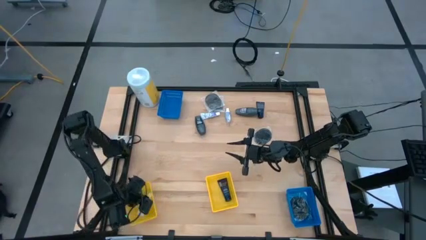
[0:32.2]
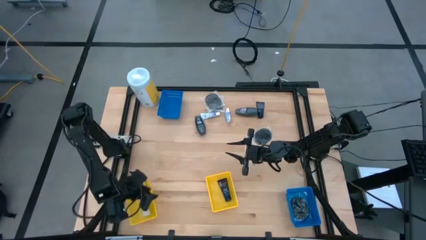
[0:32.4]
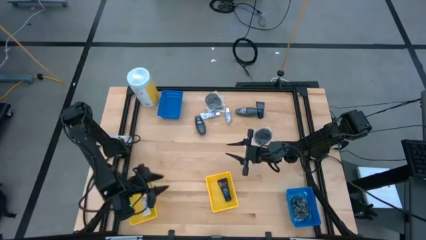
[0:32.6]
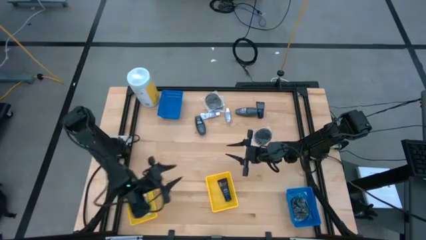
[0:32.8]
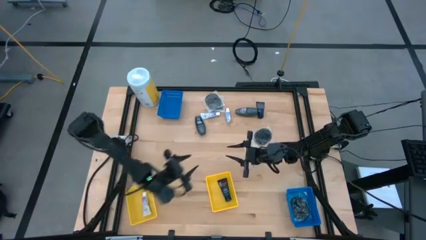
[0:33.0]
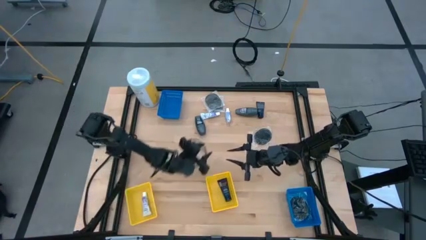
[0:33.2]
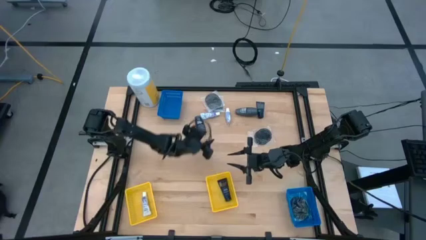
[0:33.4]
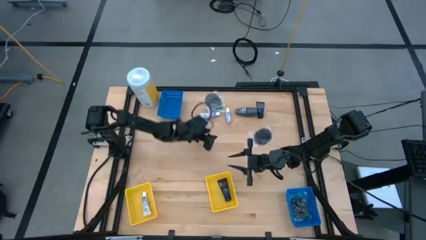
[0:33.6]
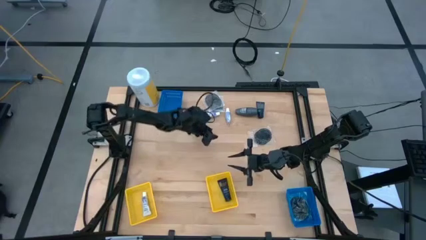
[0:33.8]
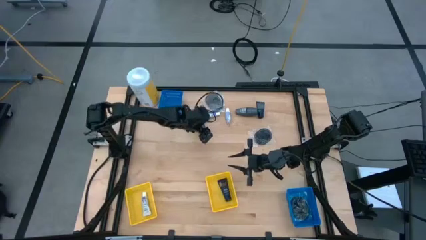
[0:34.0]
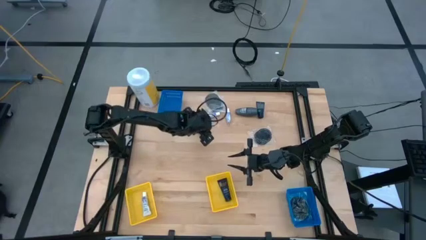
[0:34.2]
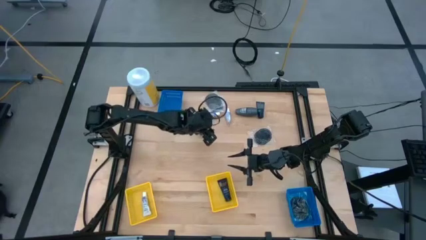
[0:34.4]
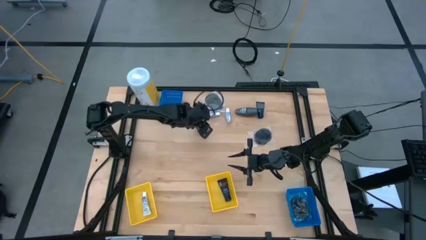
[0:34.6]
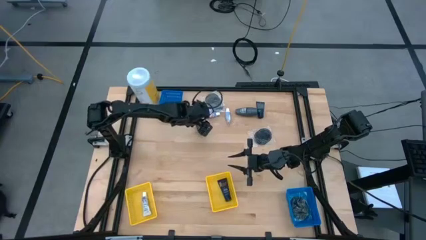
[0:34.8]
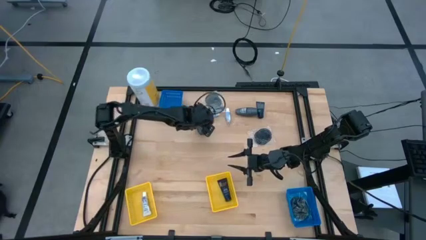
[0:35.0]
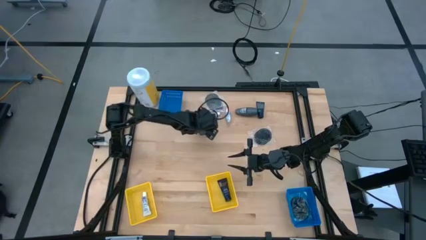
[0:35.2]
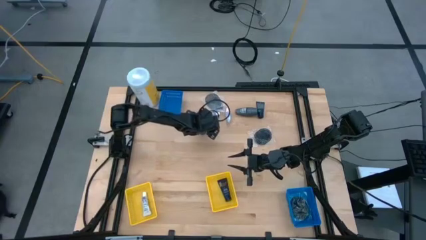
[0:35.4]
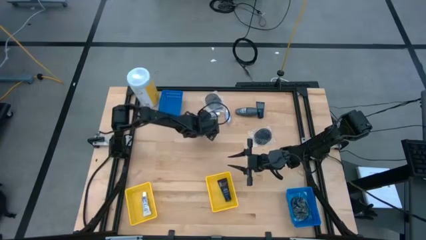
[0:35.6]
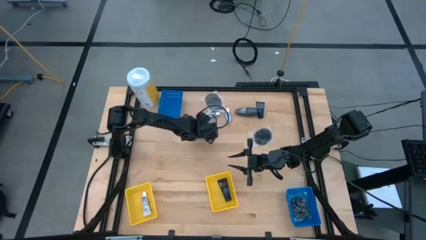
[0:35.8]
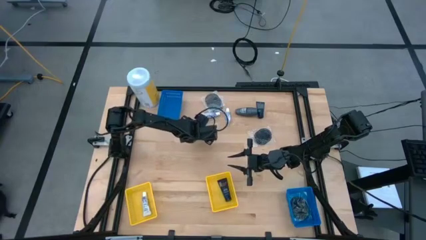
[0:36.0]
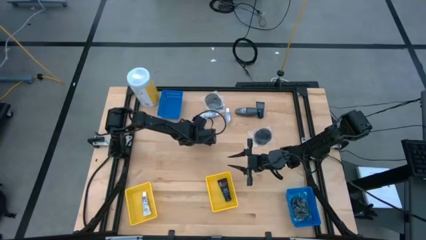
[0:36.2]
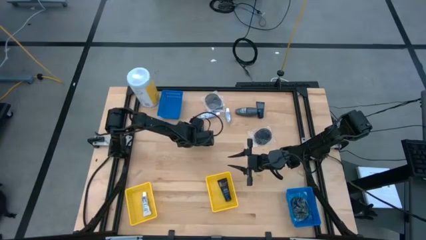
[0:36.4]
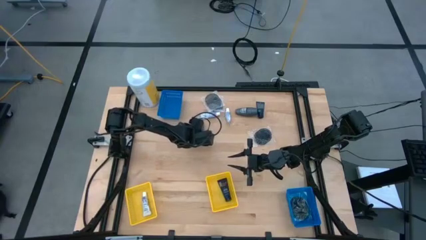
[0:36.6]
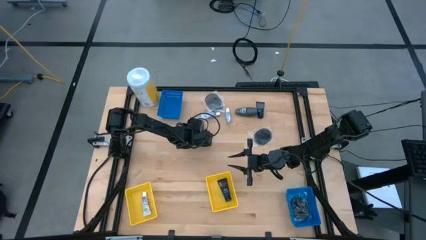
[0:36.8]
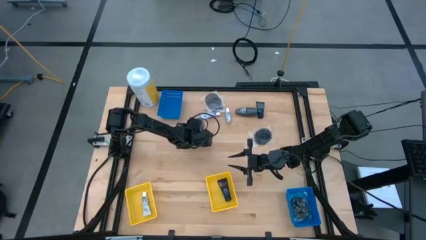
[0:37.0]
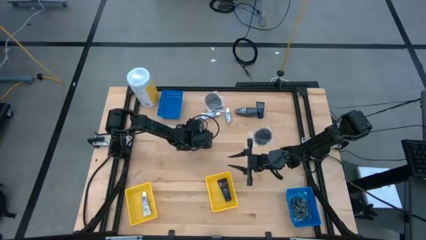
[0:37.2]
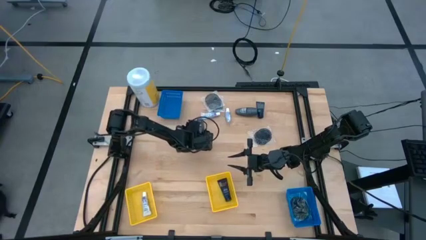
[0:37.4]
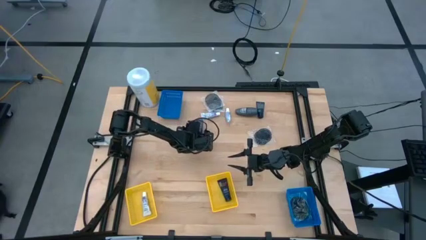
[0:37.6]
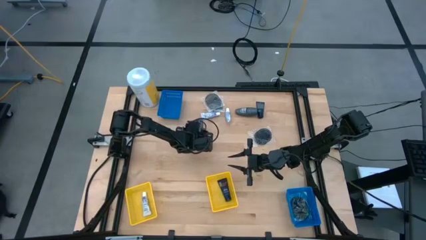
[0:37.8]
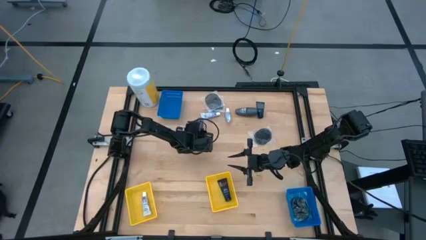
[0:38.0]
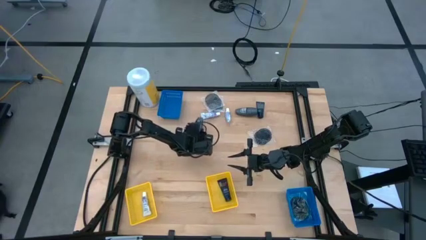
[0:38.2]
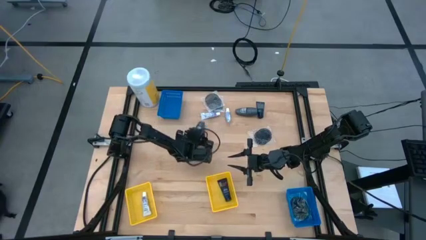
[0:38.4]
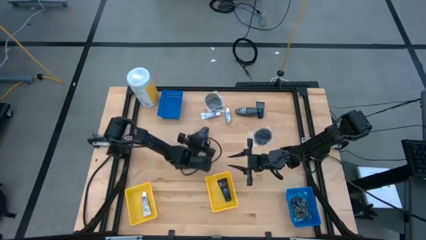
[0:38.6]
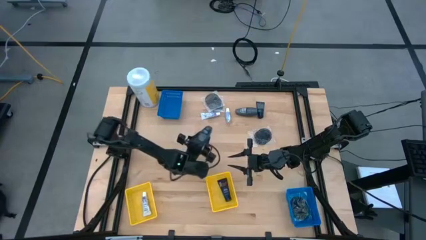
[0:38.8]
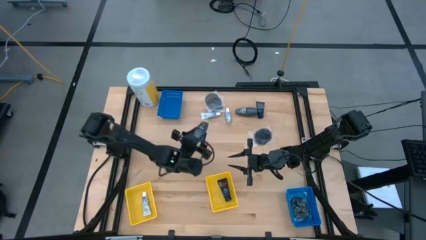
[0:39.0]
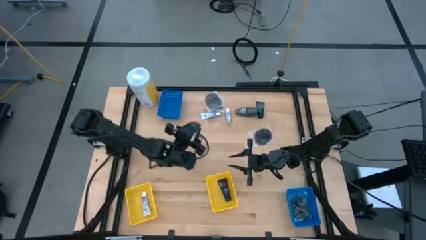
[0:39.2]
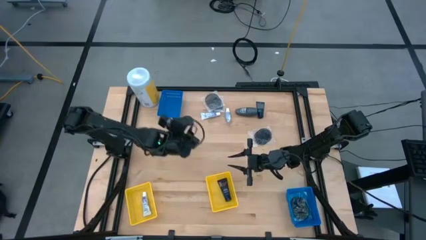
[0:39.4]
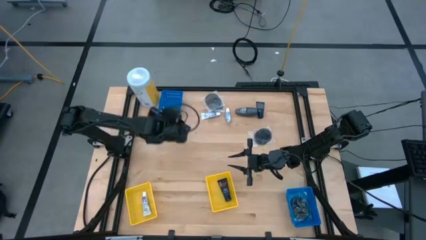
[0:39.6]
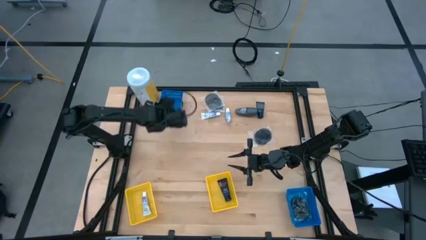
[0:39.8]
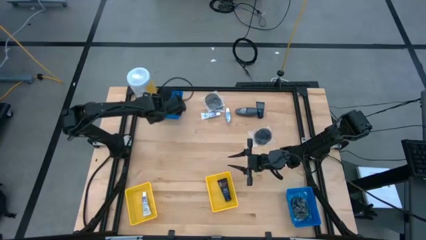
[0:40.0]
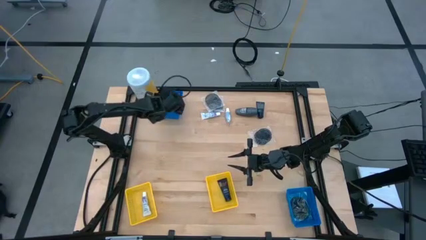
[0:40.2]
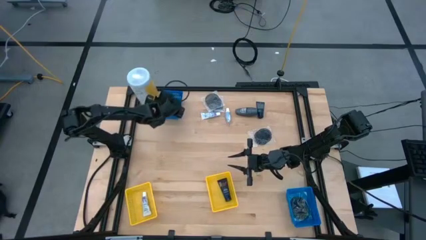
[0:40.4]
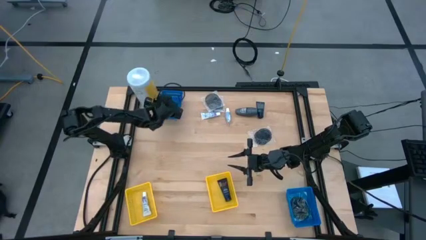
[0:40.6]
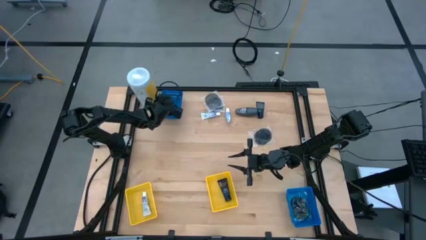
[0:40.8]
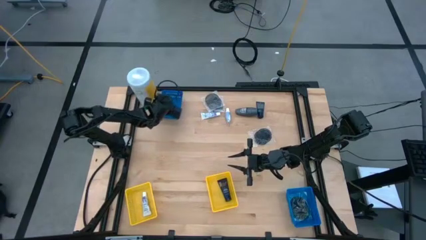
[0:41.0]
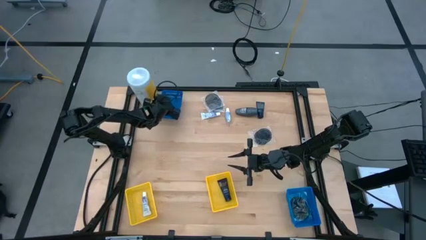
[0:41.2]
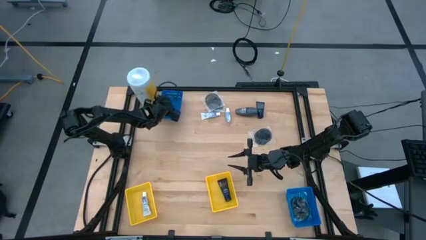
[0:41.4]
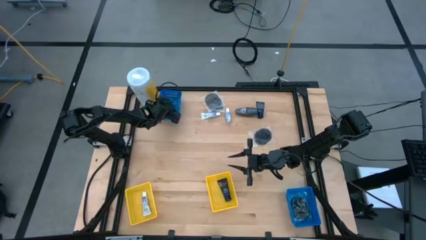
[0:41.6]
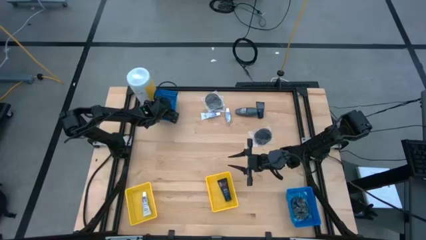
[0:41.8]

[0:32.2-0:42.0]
Task: Pick & Place Travel size toiletries
Put the black deodorant into the top blue bin

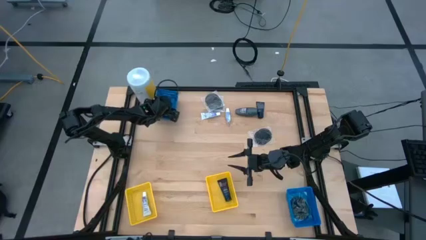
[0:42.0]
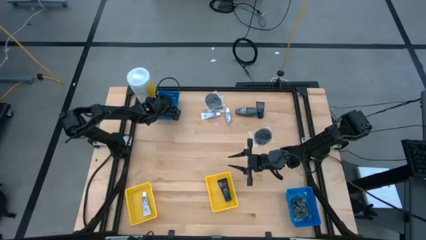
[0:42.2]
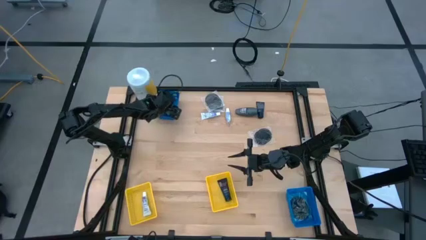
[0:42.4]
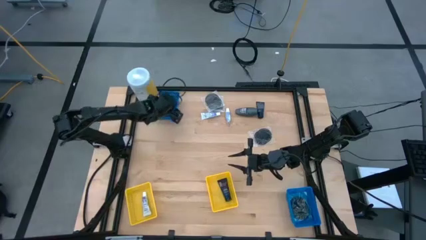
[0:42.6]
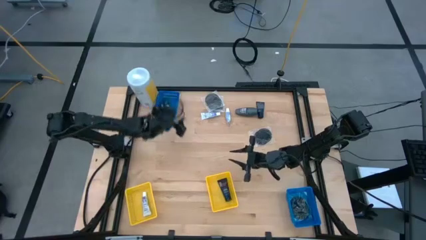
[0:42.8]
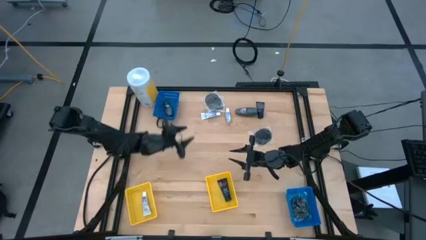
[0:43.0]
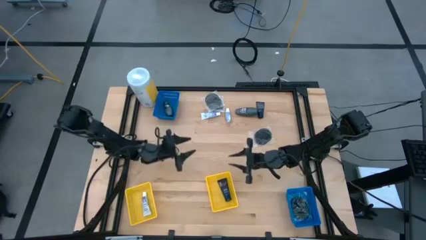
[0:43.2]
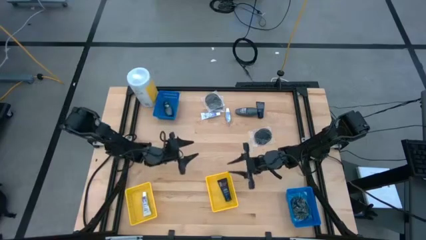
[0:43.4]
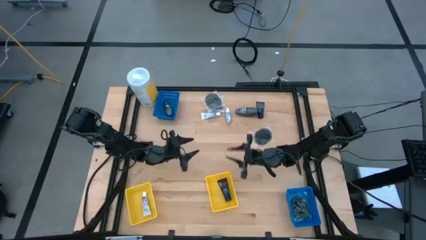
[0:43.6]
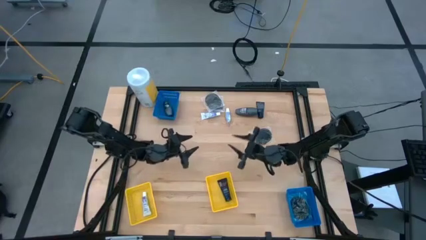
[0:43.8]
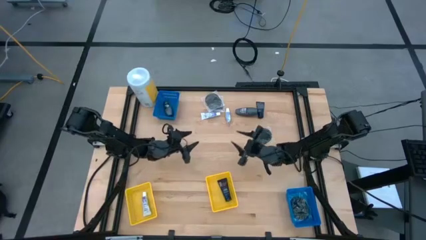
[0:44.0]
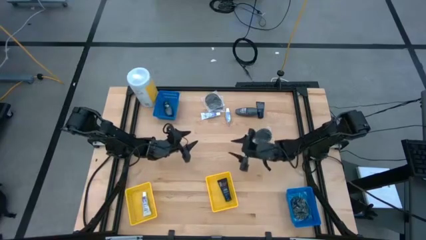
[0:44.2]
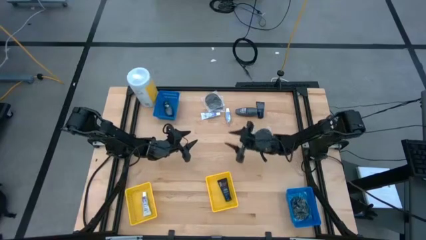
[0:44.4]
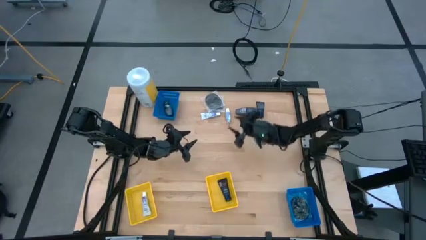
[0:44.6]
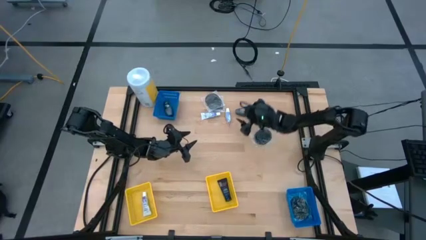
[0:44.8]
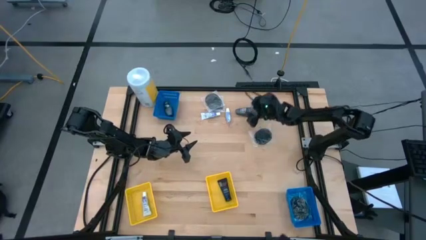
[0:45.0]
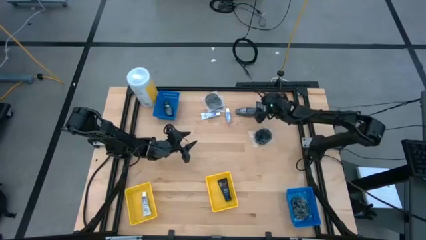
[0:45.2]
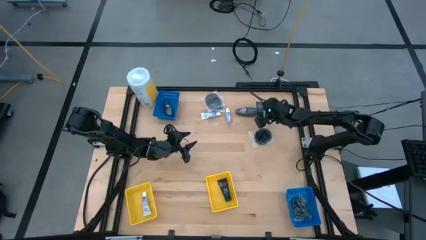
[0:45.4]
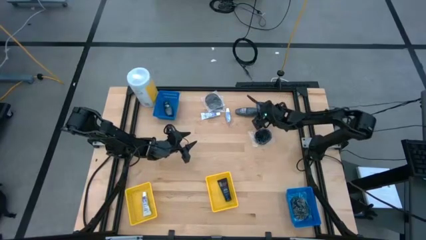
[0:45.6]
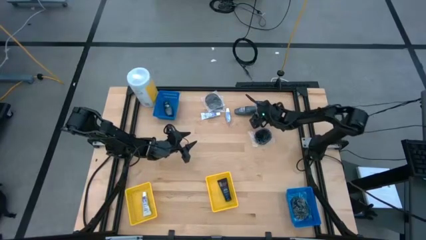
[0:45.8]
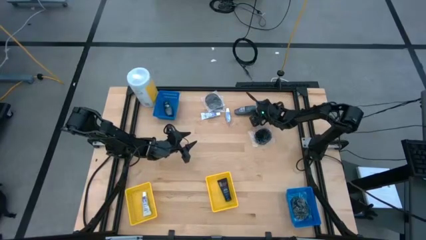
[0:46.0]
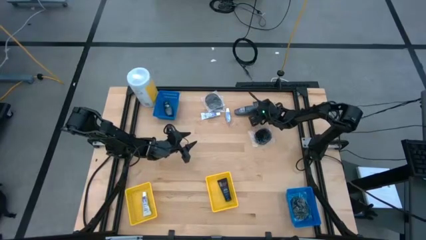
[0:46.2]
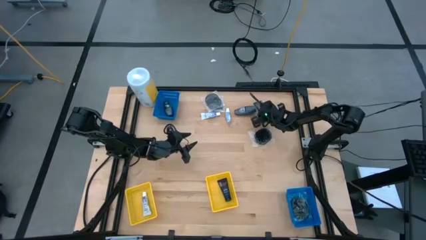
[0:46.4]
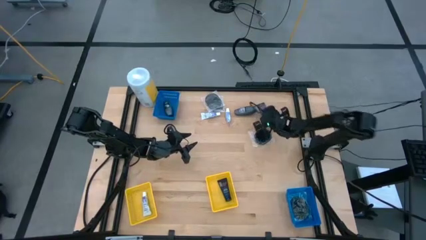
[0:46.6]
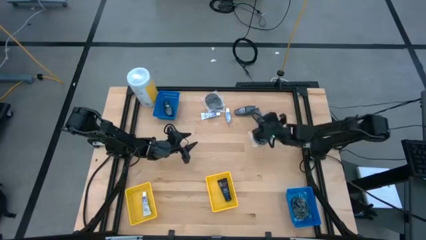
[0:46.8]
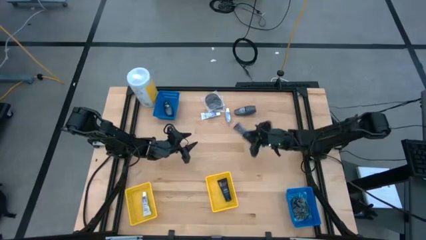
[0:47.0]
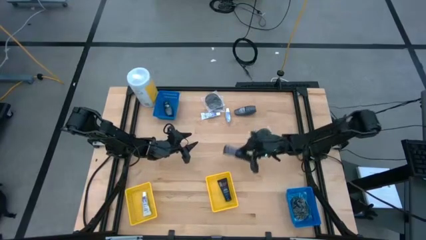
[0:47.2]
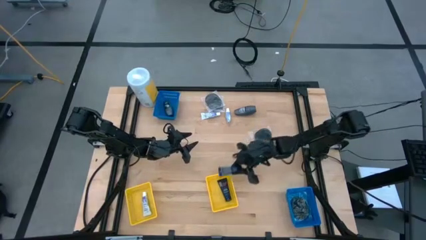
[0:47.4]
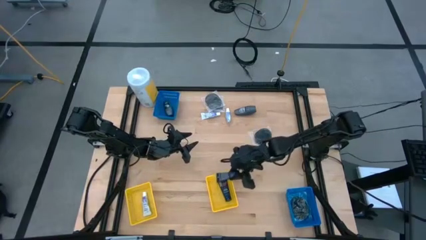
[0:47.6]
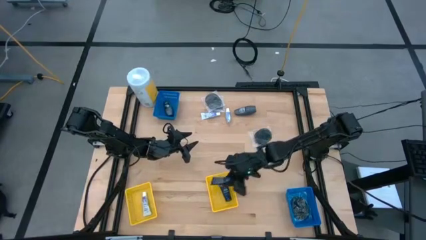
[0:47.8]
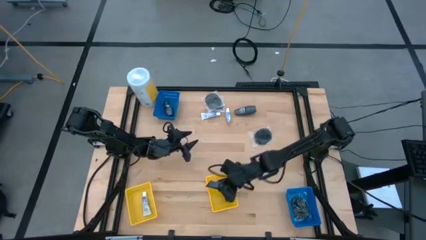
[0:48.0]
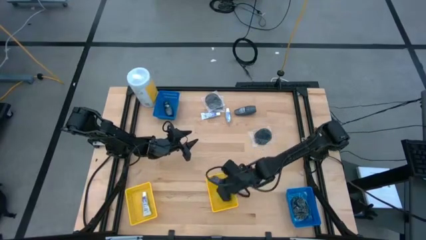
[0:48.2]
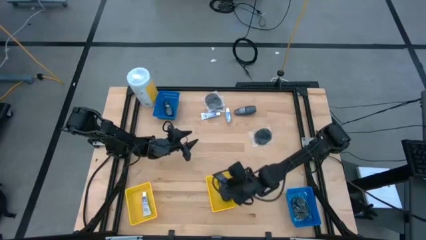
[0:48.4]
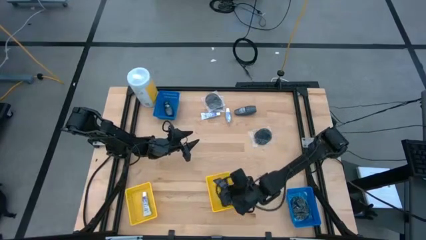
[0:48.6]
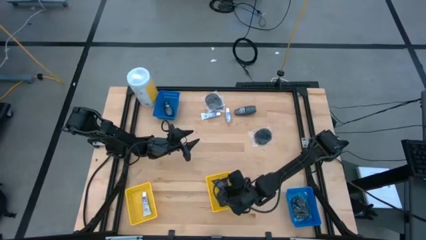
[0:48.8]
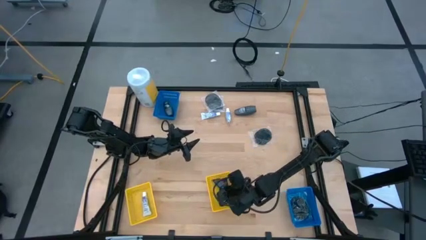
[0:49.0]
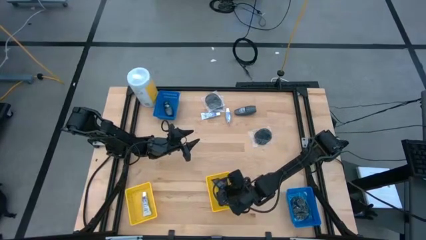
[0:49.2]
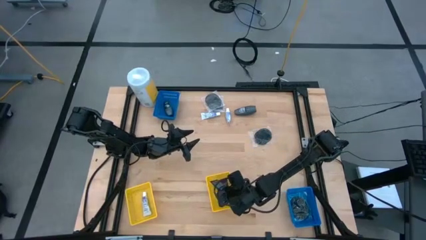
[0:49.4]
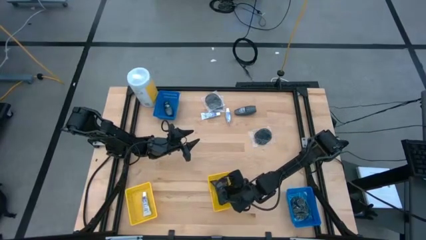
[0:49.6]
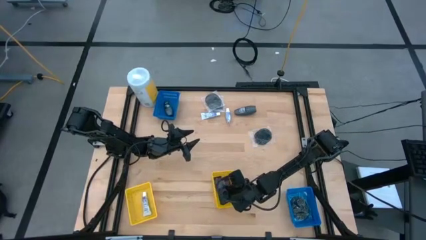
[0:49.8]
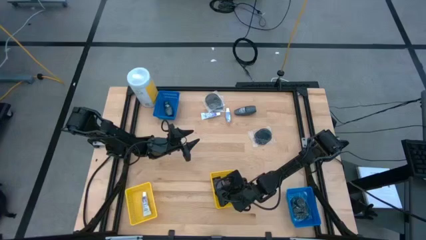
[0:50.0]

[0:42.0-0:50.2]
Put the blue shave cream into the right yellow bin
